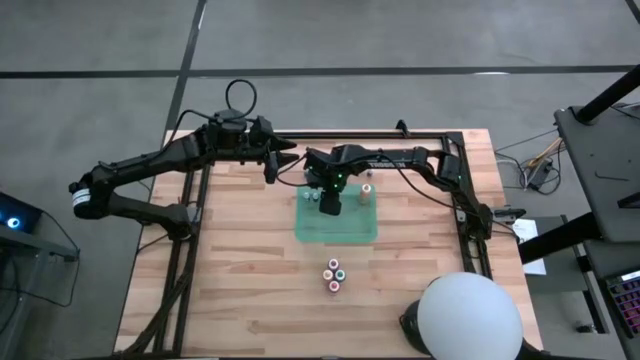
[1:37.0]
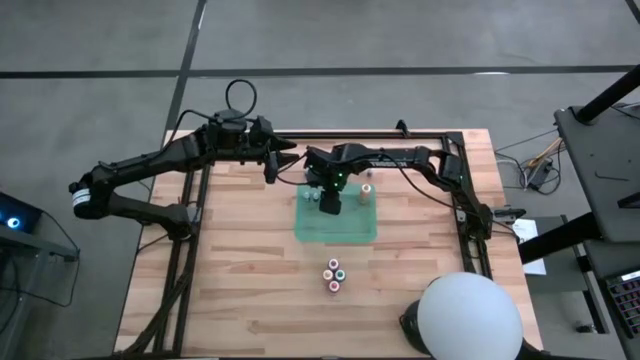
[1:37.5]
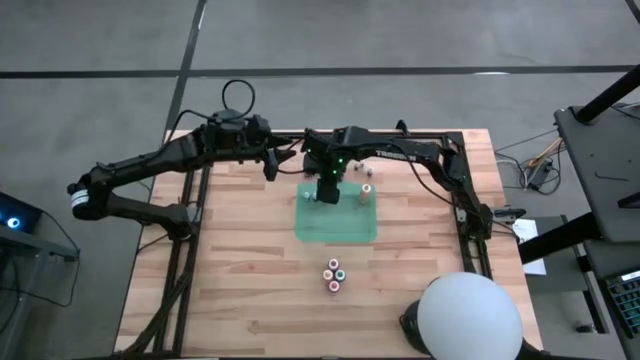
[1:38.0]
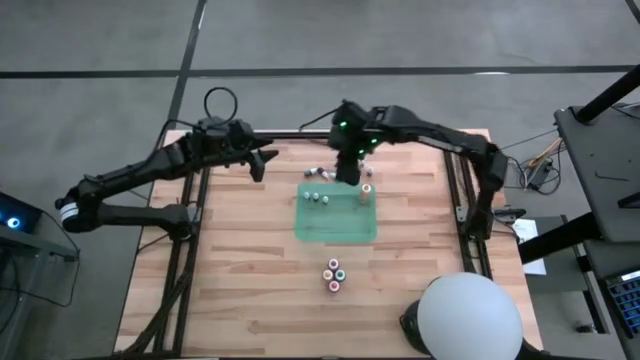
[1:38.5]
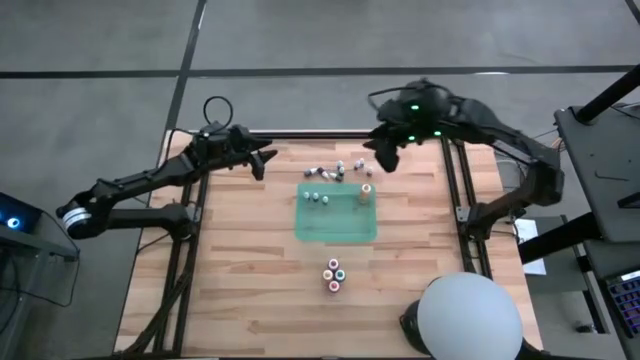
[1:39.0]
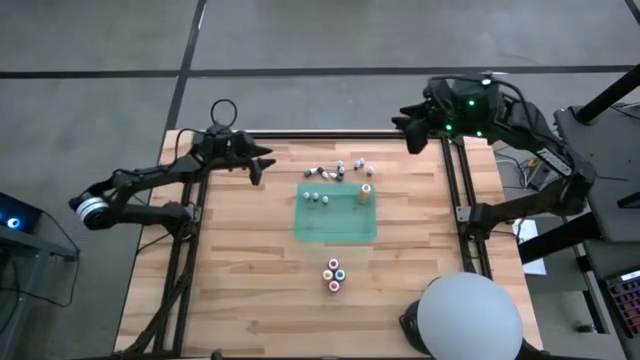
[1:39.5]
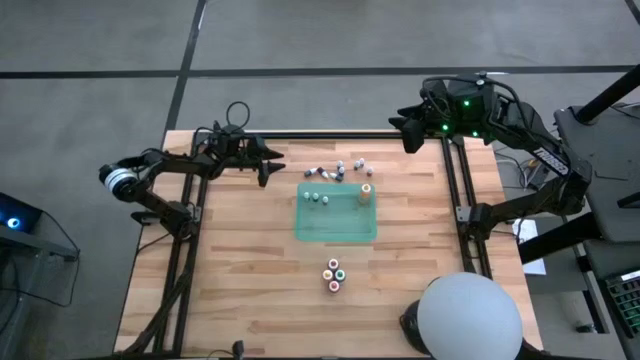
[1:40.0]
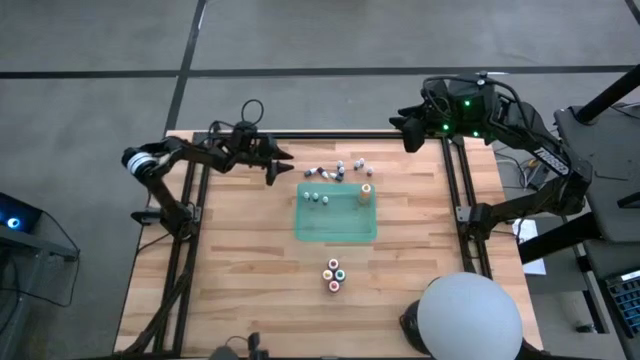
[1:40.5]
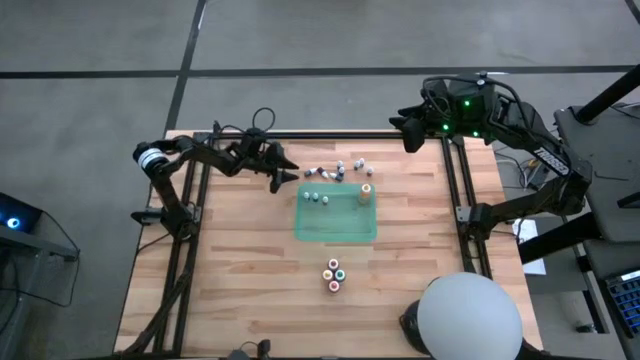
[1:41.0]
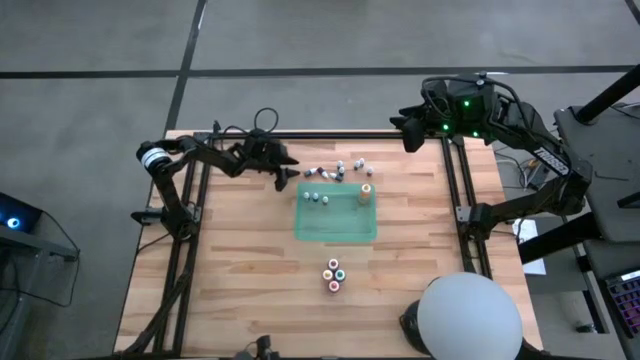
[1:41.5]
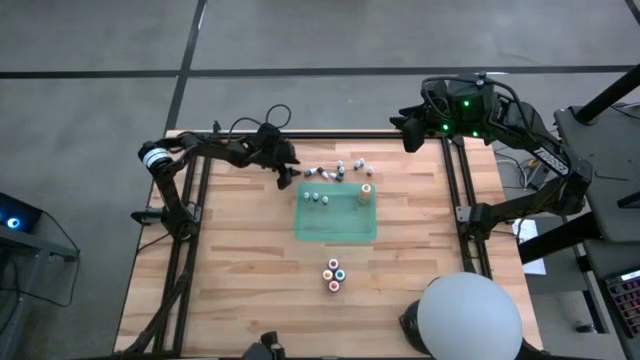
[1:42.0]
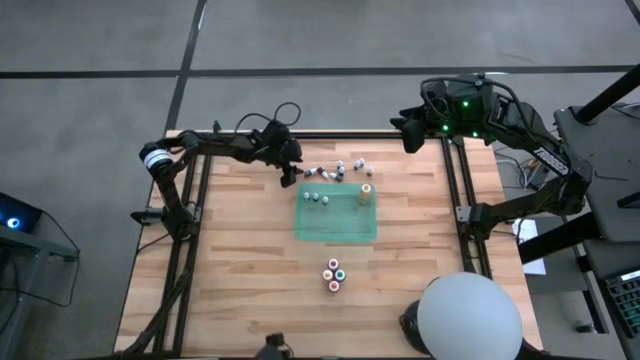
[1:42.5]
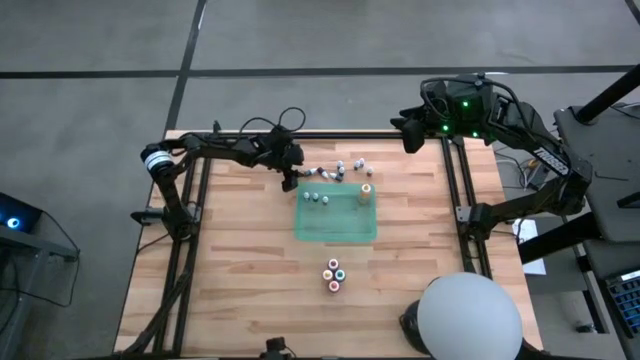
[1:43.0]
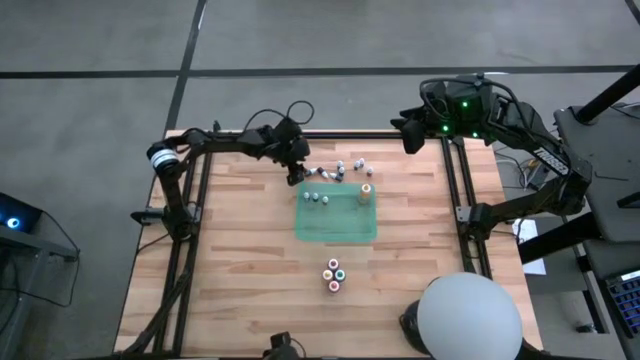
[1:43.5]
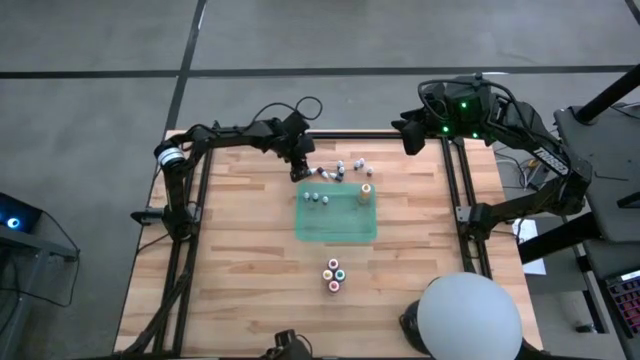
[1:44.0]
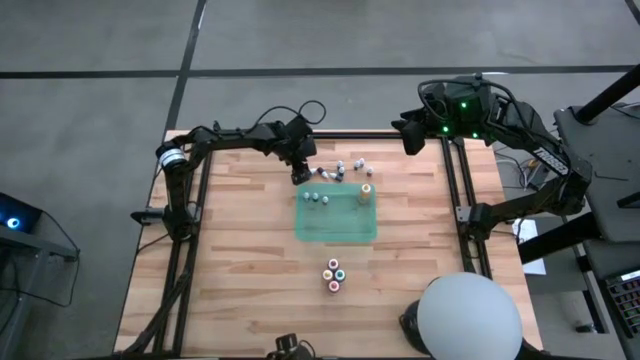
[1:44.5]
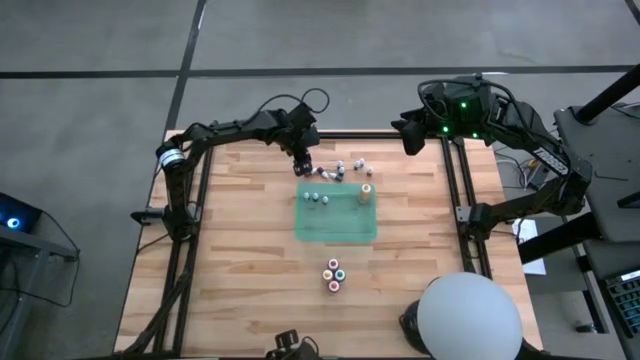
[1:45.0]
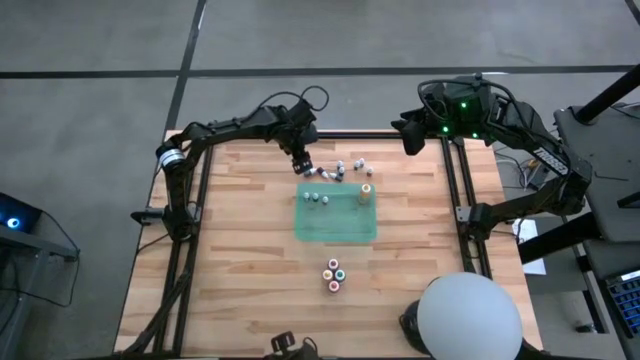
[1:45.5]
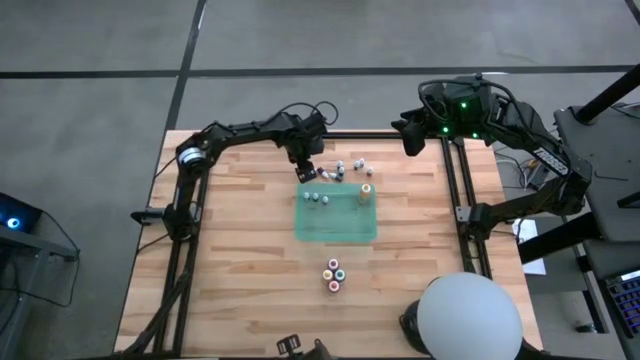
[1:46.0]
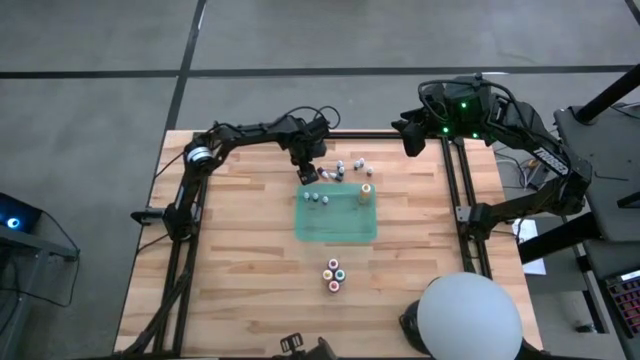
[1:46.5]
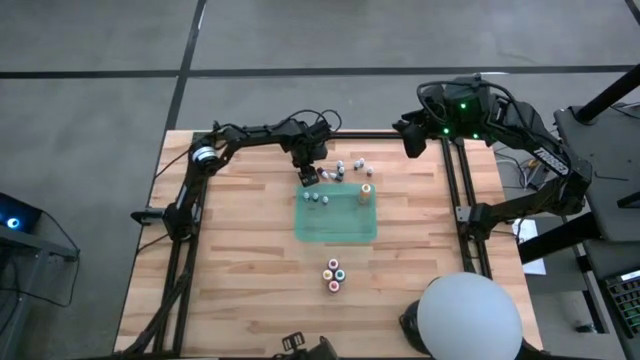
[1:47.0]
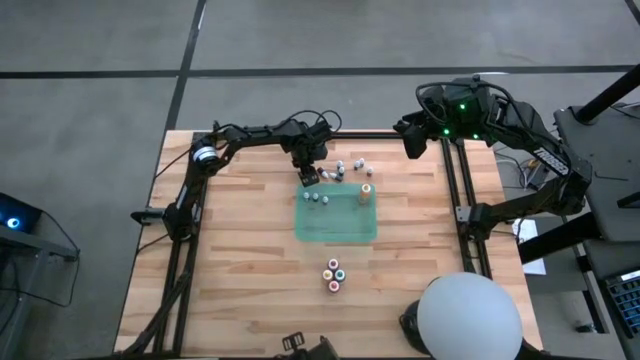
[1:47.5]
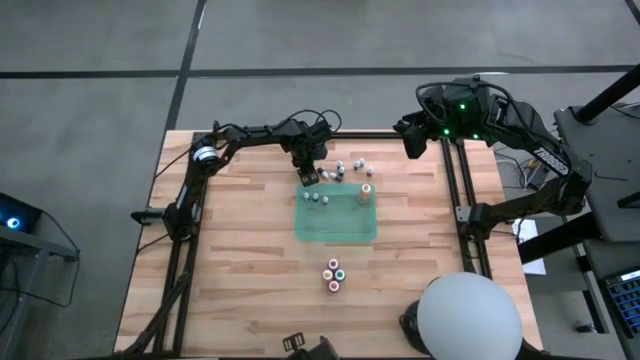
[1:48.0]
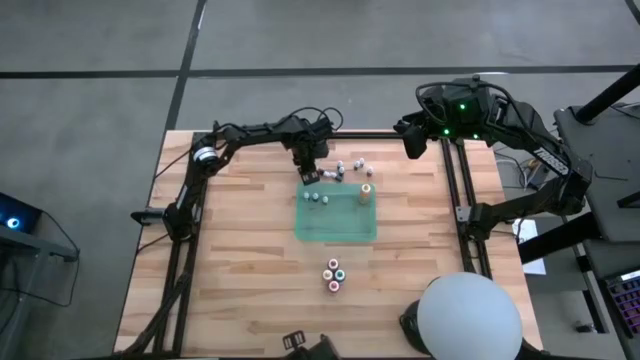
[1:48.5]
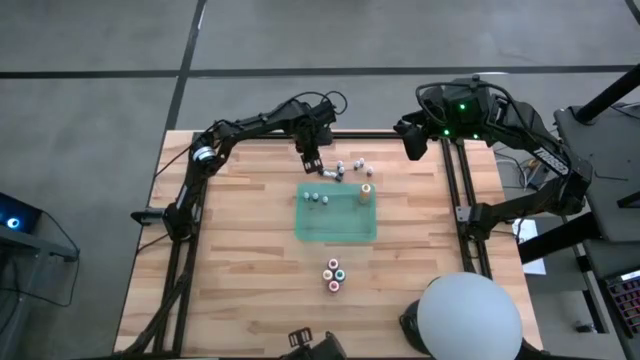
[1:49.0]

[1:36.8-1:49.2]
Task: Pick & Place food coloring
Put the black small food coloring bottle into the green container

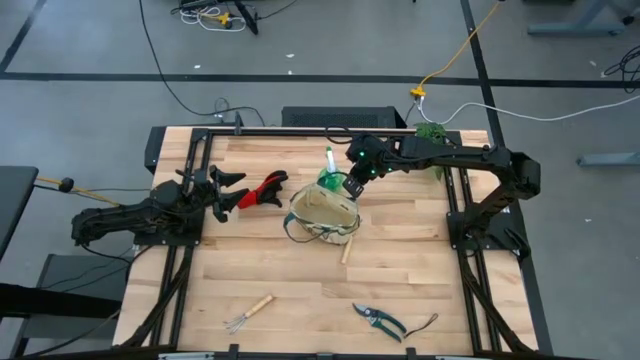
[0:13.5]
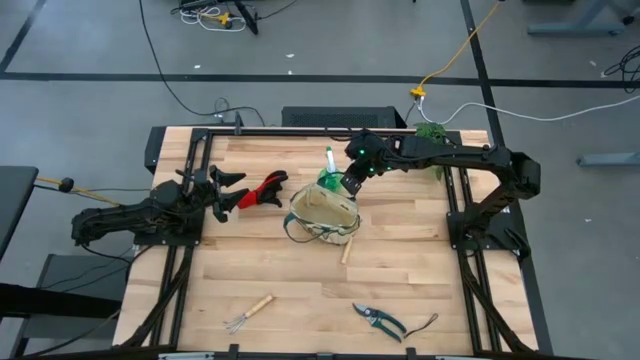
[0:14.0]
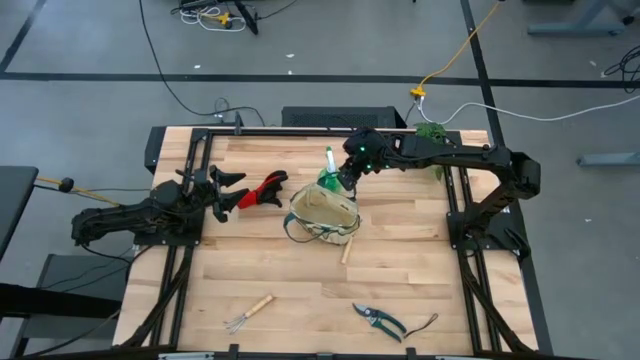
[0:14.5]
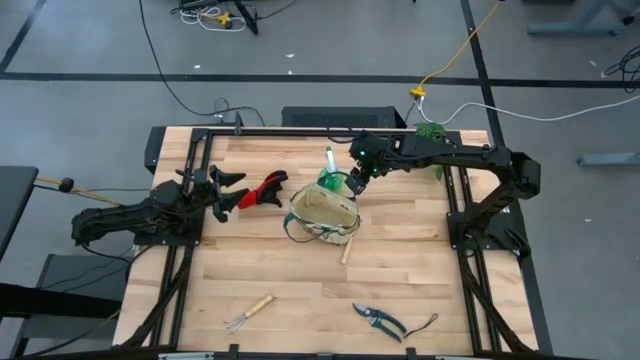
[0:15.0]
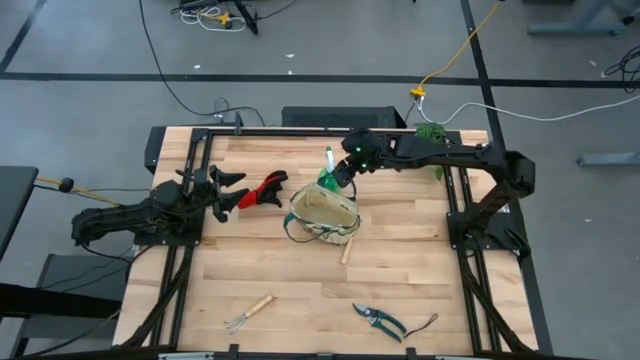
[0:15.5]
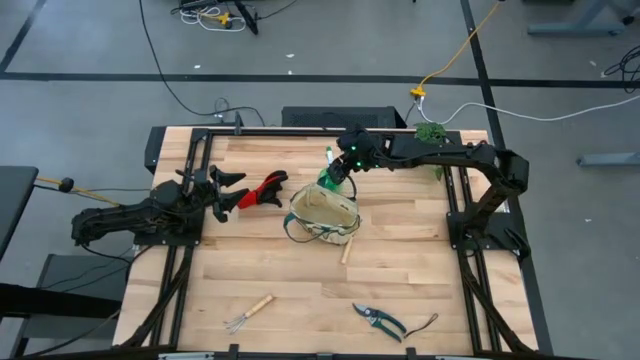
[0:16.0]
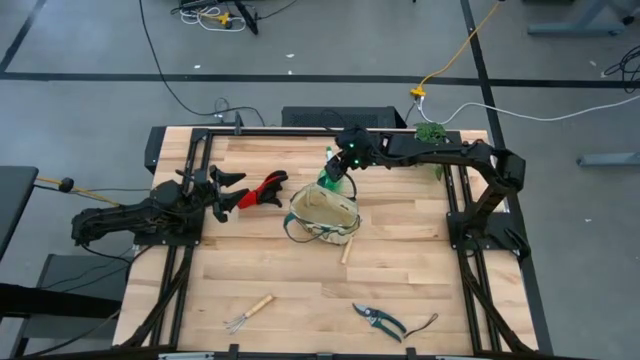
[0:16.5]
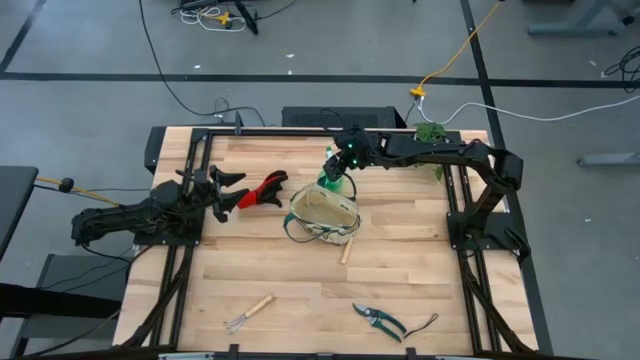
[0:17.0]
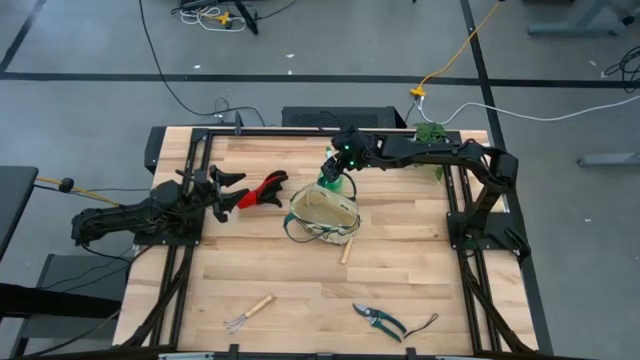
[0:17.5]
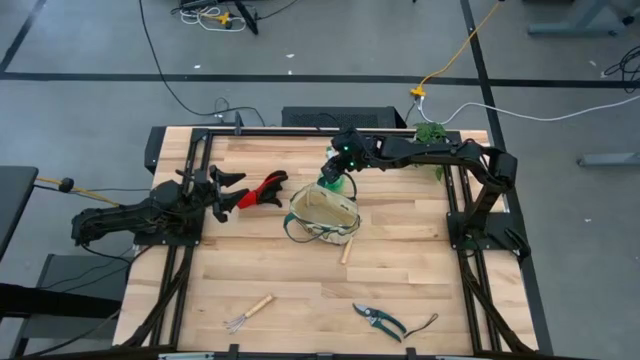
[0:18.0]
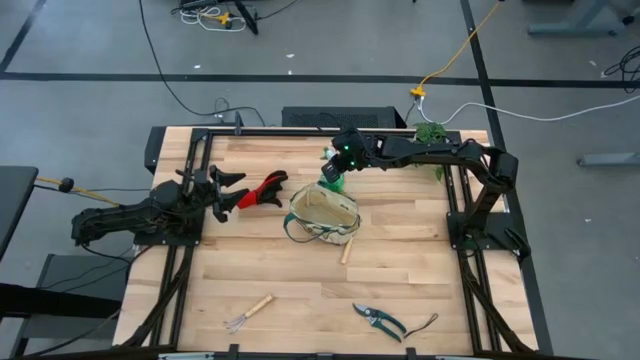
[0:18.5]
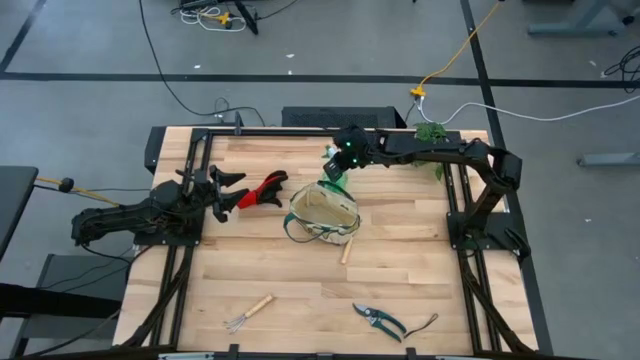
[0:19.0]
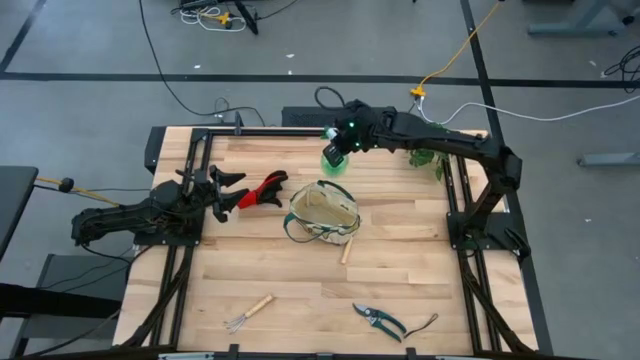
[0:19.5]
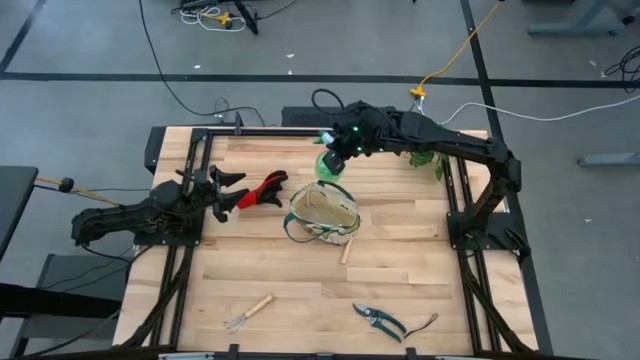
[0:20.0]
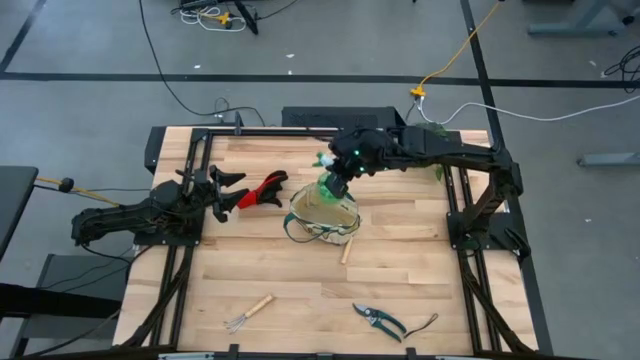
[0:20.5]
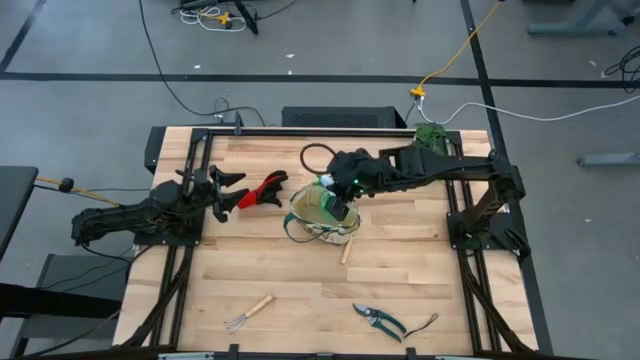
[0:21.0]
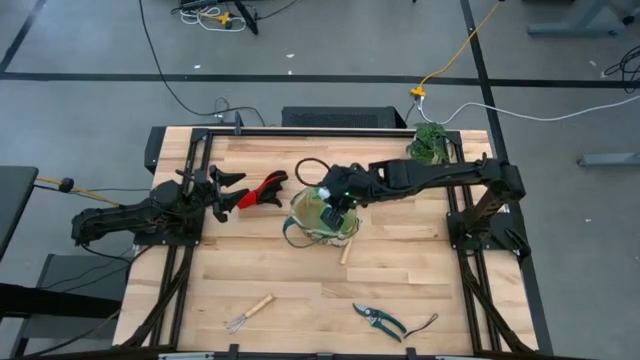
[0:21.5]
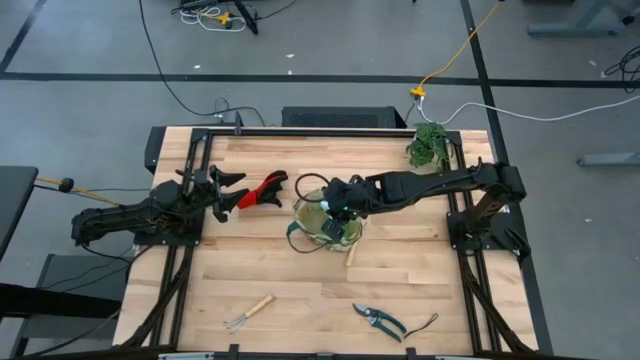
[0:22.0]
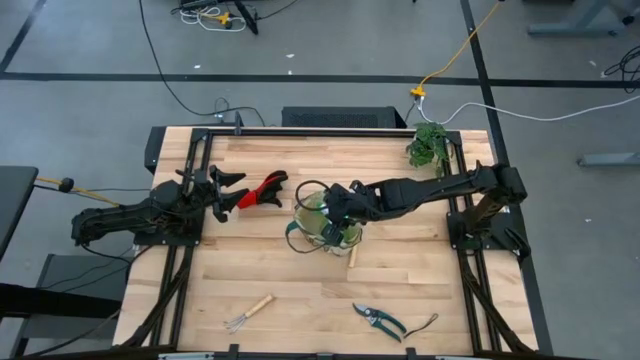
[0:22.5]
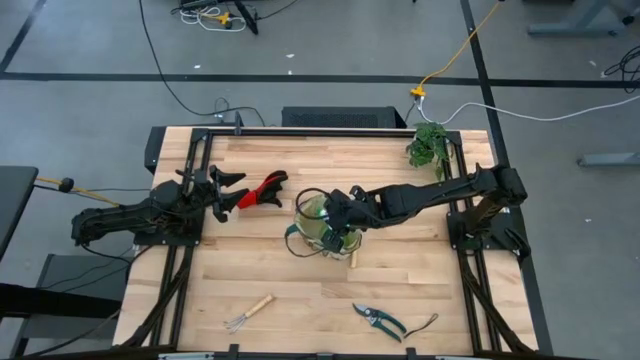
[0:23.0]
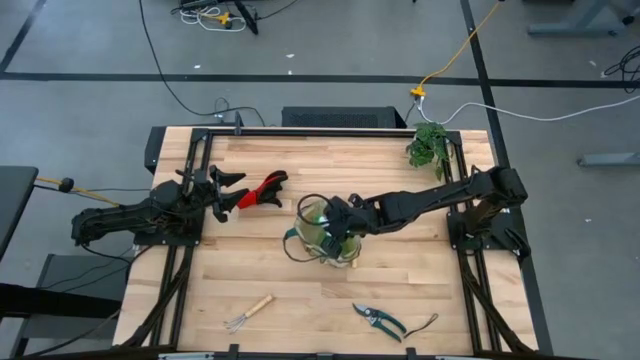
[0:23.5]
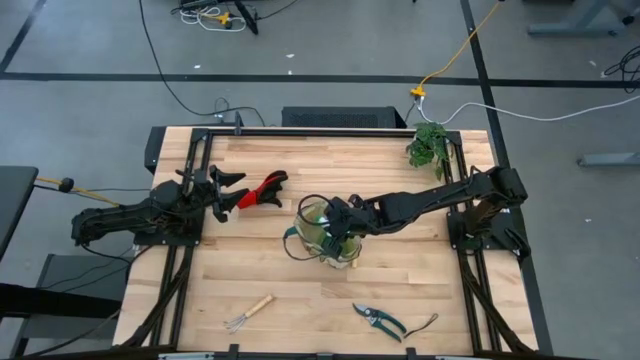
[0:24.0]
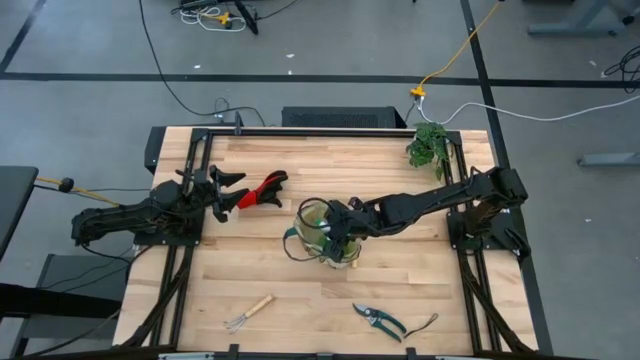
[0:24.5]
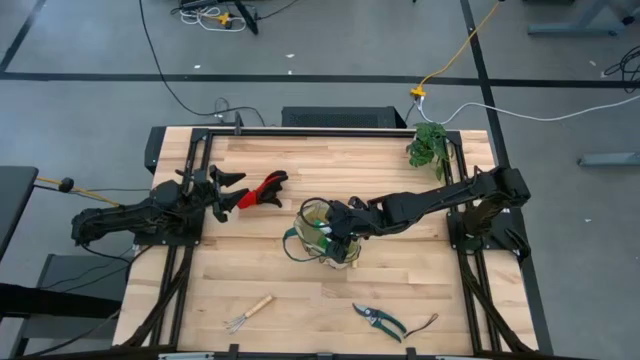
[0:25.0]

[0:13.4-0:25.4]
Task: Pick & Place Garden tools in Gardening bag
Put the green spray bottle into the white bag
